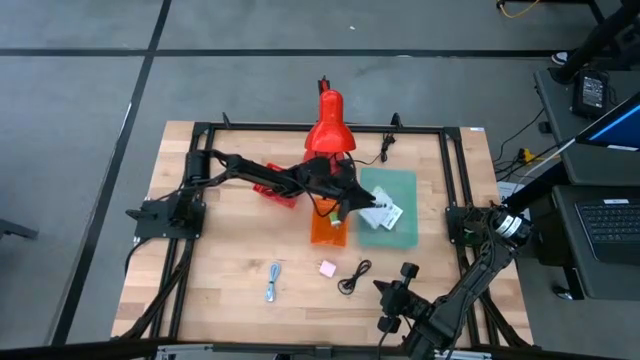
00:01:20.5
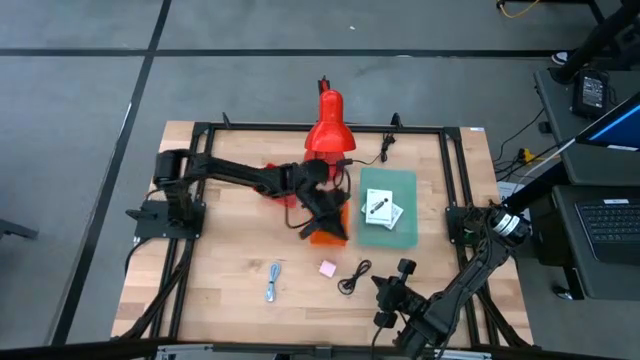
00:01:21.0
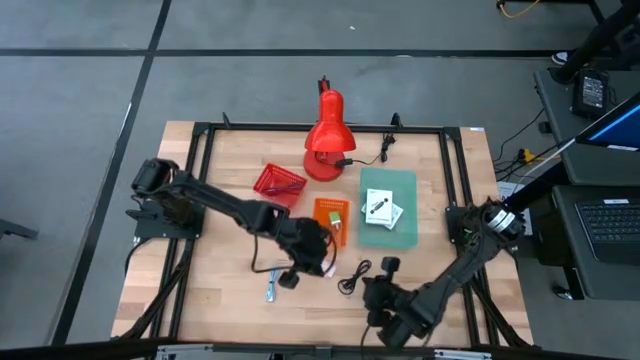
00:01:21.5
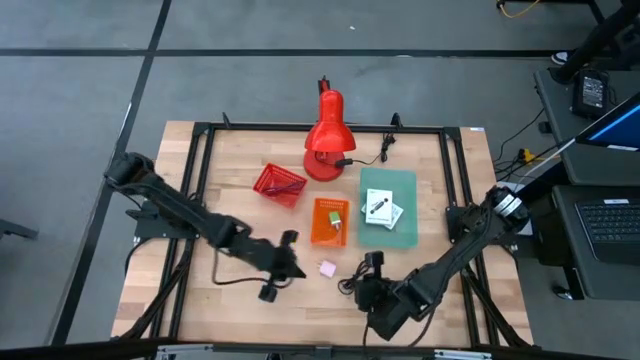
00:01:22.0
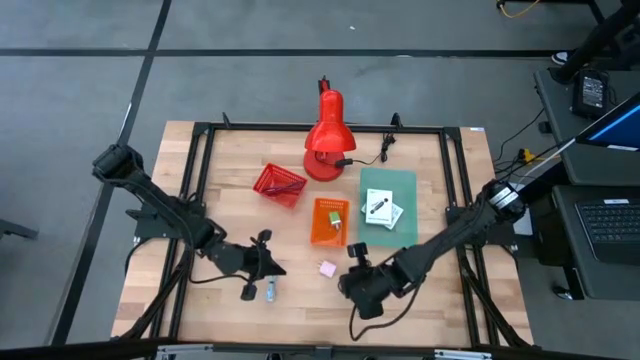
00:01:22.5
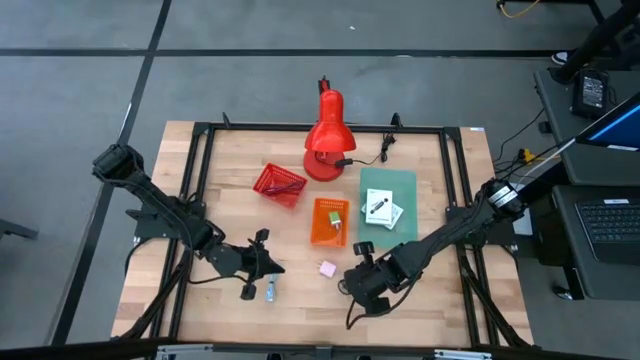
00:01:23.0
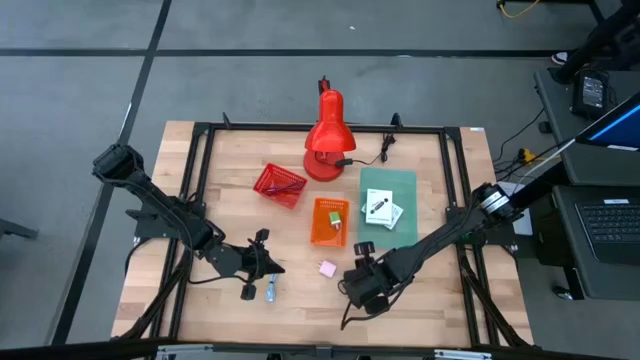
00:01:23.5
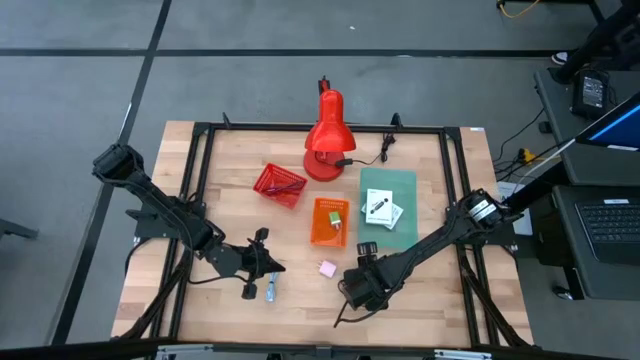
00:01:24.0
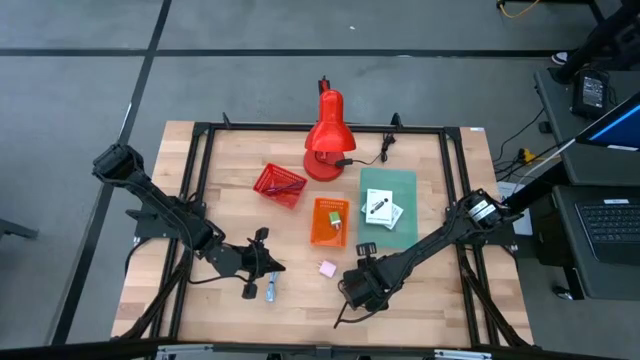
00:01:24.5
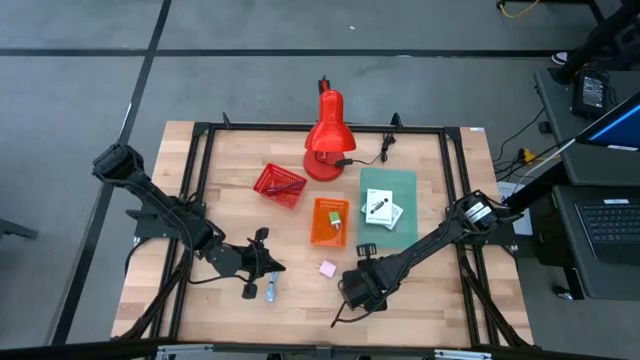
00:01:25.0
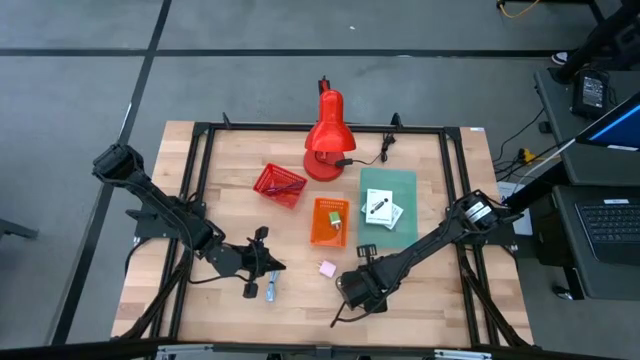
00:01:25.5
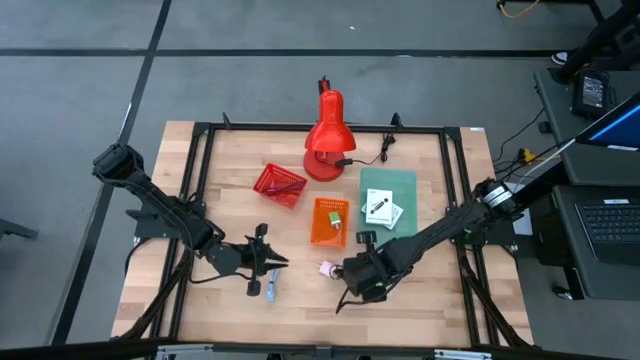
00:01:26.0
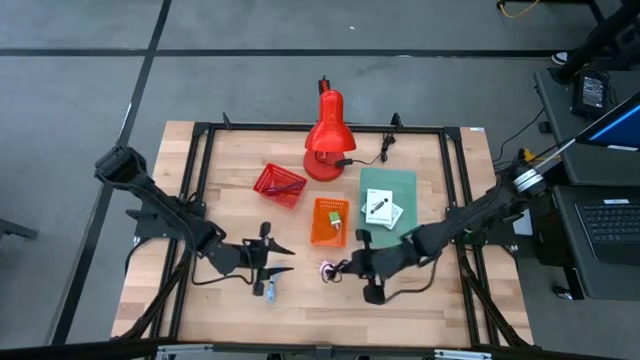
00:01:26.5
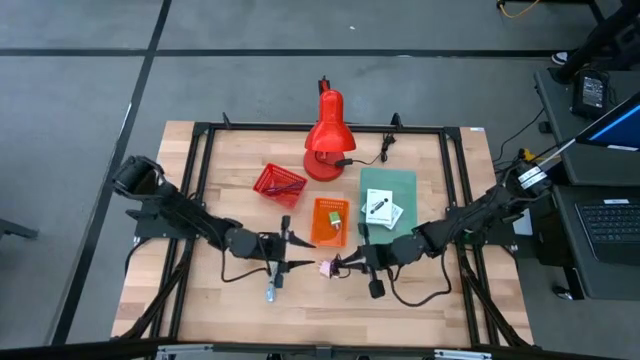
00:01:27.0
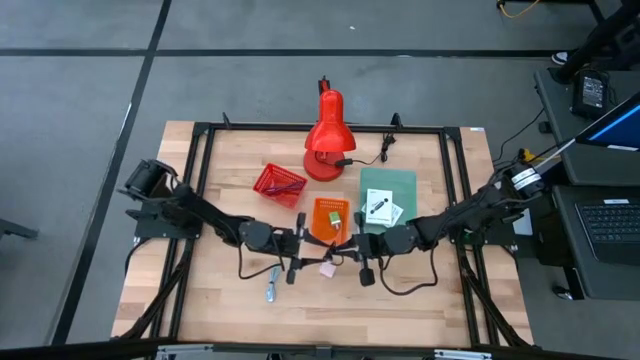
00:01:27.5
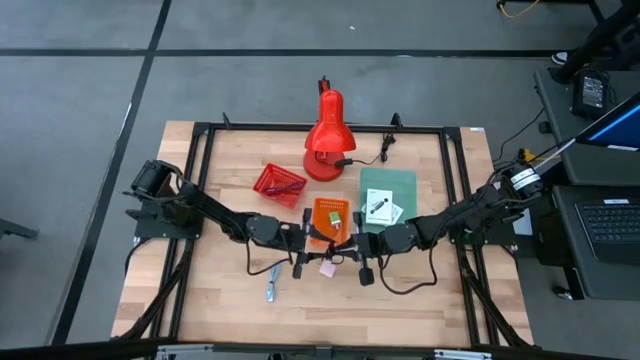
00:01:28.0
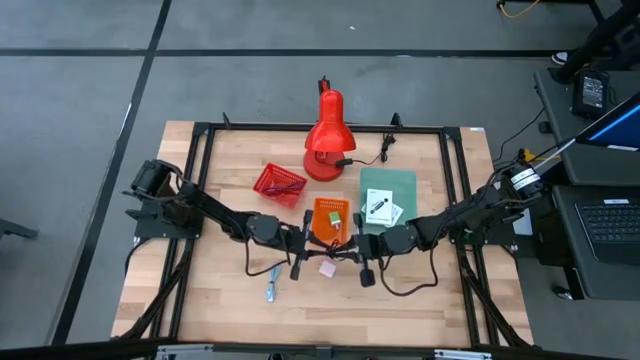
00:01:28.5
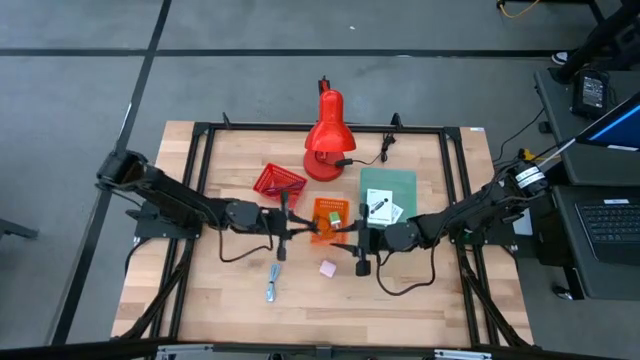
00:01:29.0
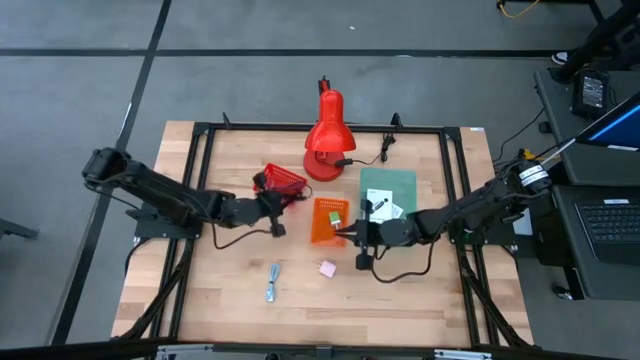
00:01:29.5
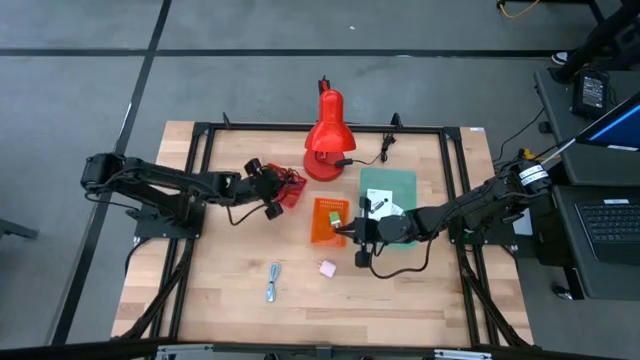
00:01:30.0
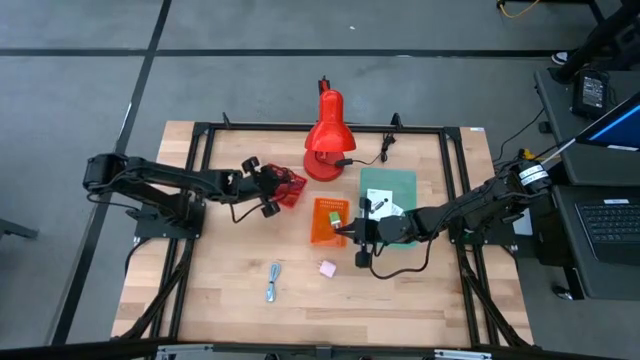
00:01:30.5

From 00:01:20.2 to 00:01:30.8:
Task: Pick and place items into bin
Put the black USB cable into the red bin

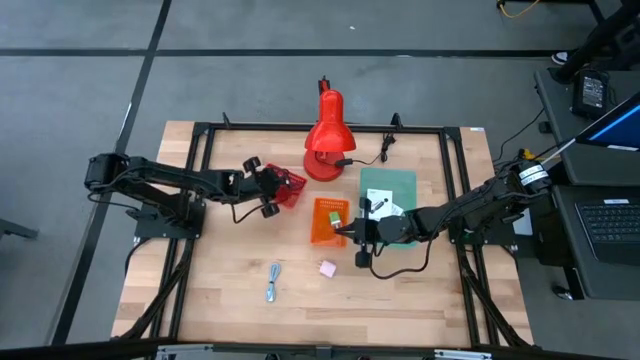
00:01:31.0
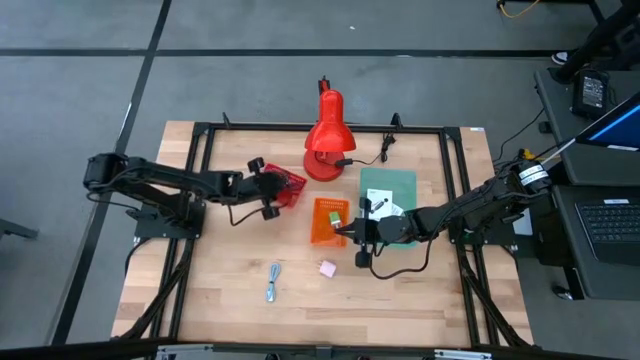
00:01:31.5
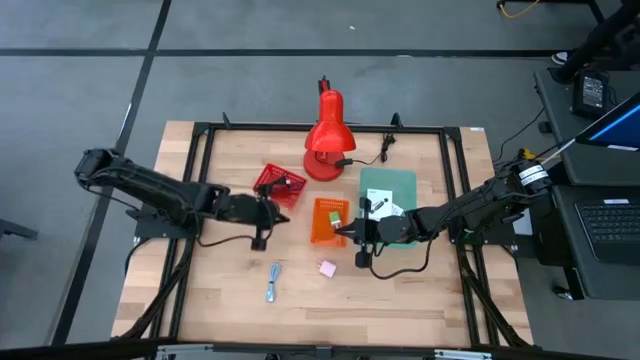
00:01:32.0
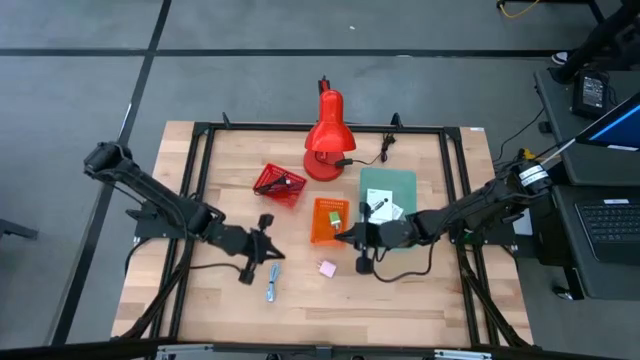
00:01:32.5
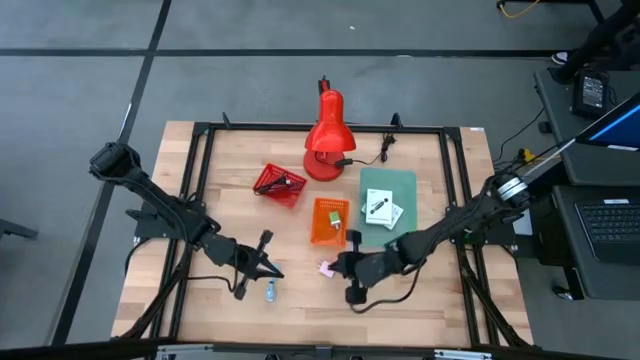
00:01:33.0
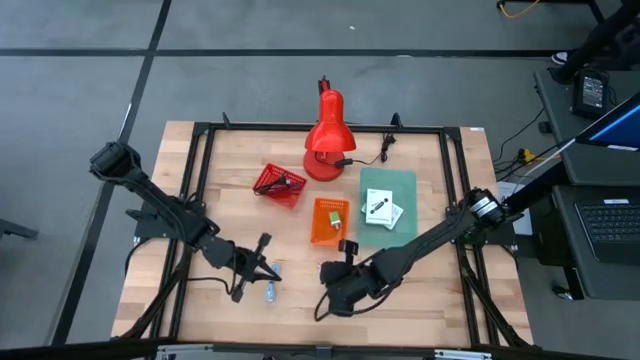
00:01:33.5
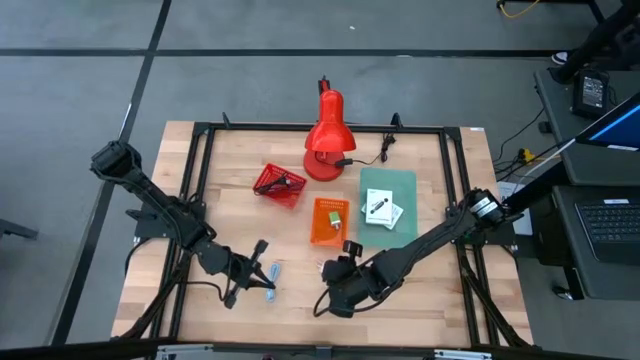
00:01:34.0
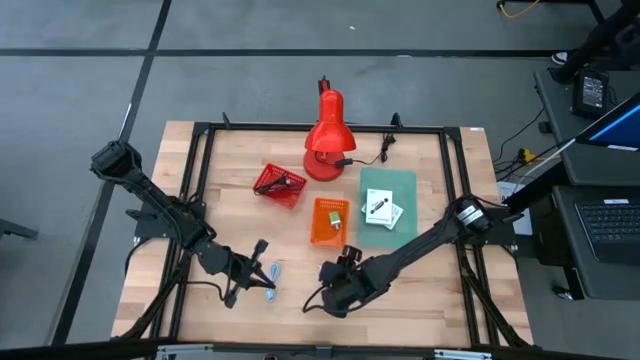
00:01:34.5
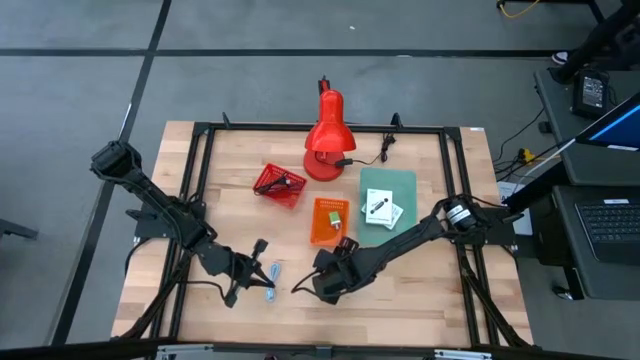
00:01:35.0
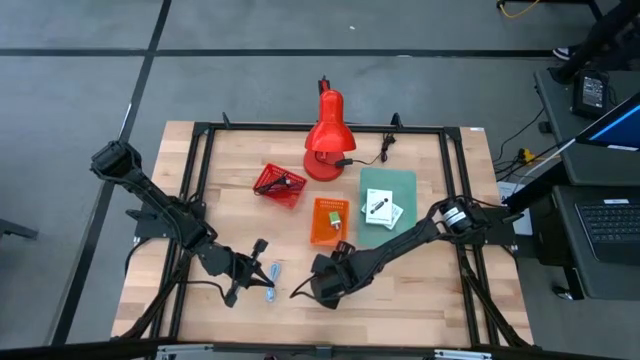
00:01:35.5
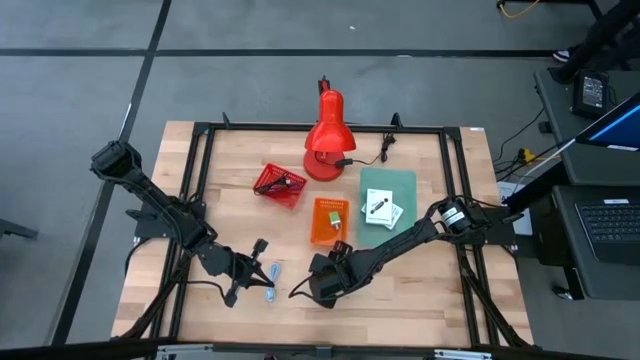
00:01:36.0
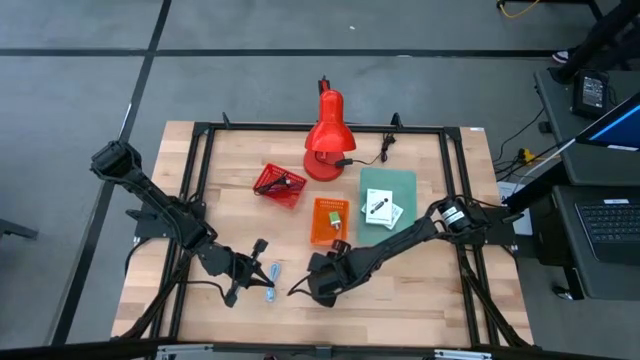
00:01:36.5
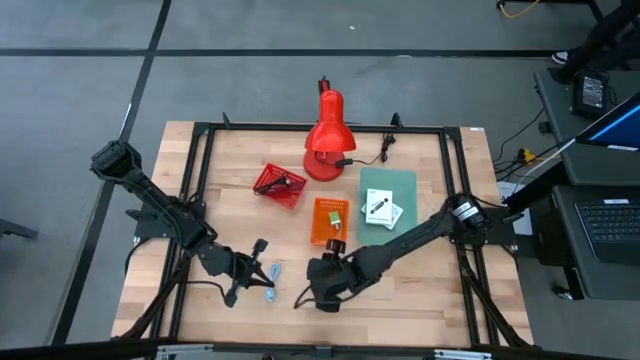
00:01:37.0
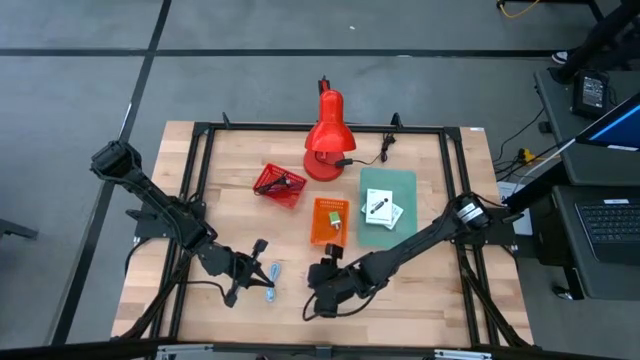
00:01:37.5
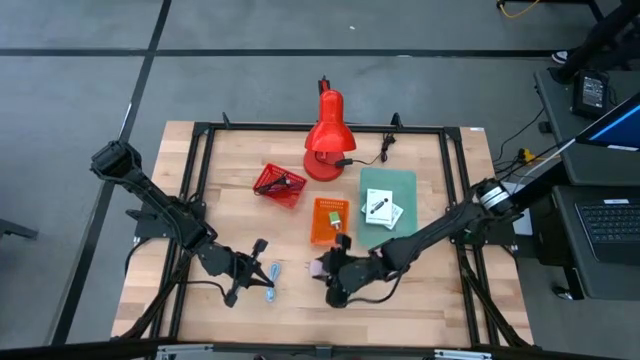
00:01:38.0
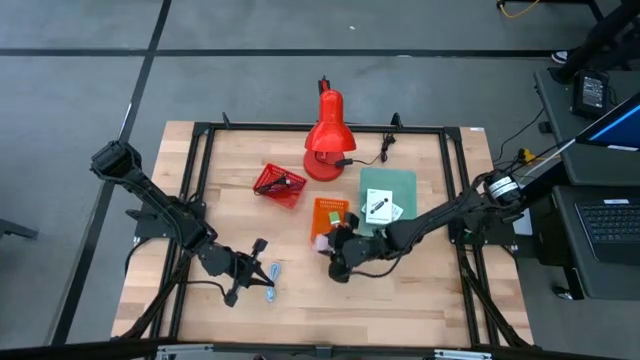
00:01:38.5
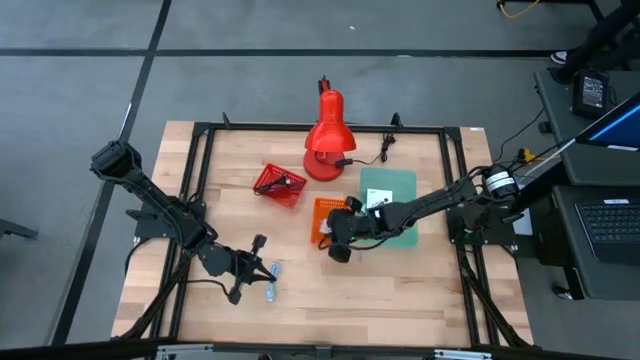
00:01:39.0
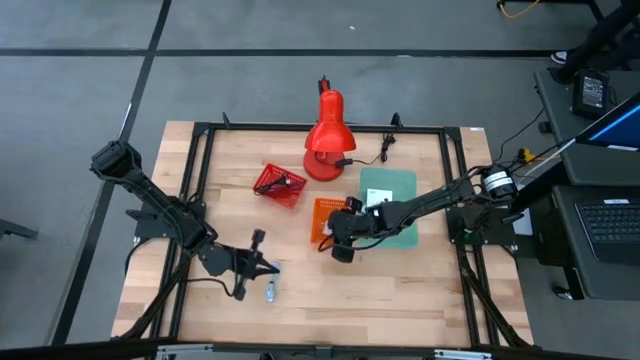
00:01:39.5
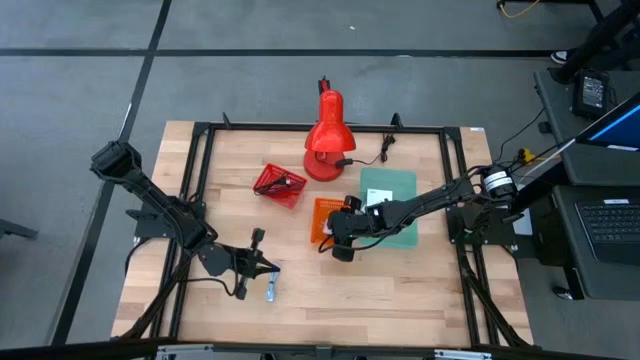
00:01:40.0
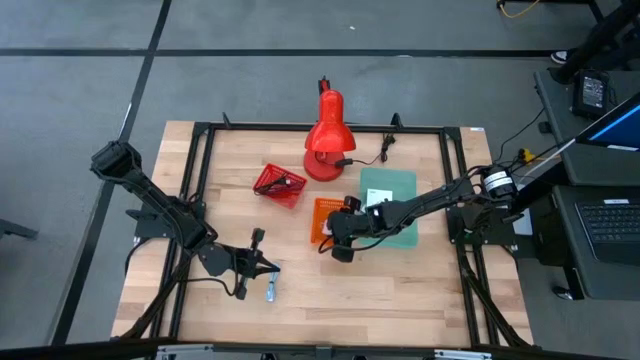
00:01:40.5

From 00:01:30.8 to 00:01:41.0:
Put the light pink charger adapter into the orange bin

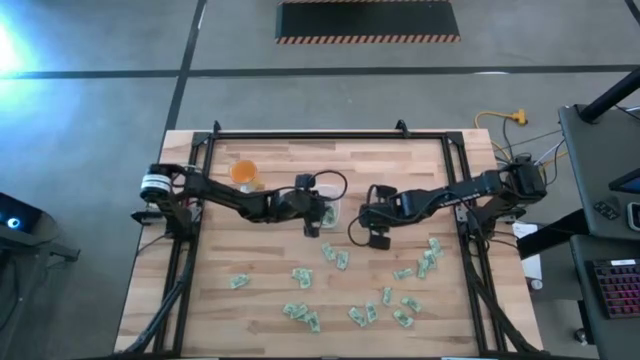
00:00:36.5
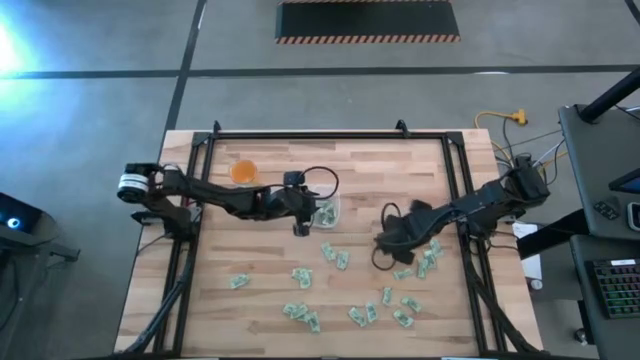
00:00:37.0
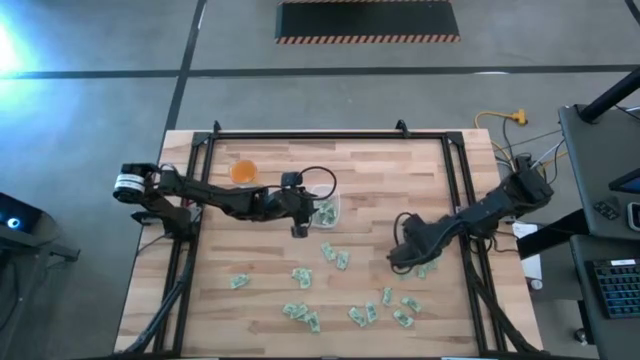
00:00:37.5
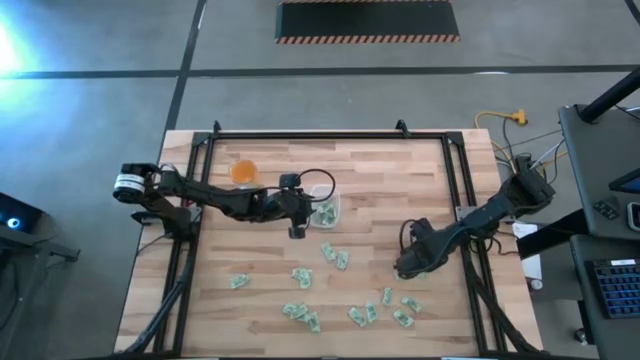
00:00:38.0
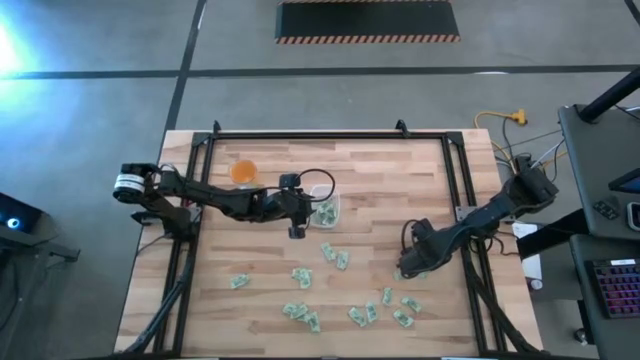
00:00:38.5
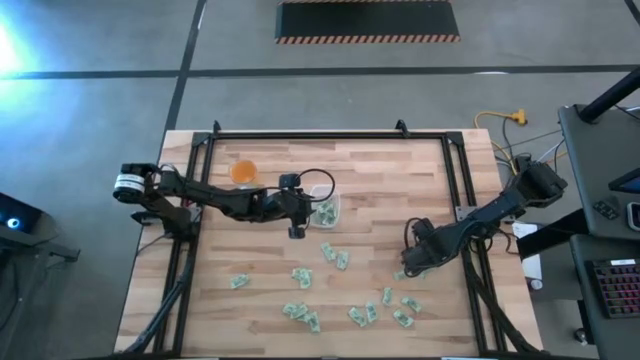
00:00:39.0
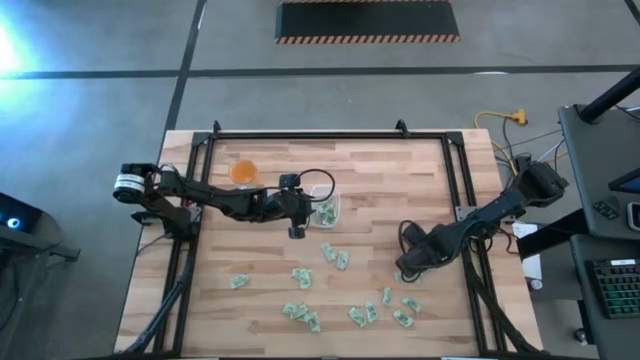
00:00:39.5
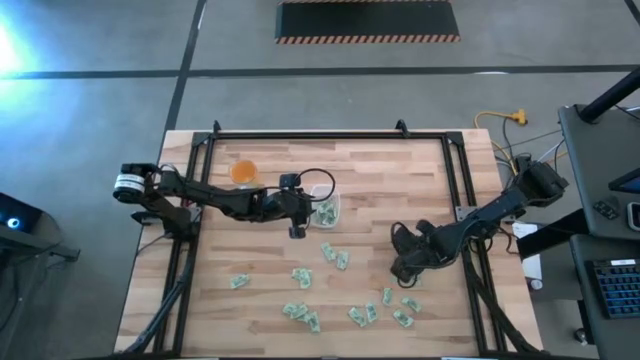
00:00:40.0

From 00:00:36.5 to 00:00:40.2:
Task: Pick and place Stevia / Truvia into bins
Put the stevia packet into the bin
